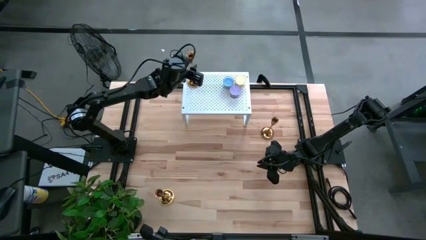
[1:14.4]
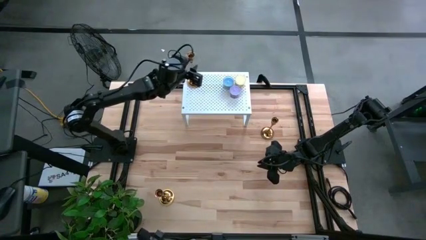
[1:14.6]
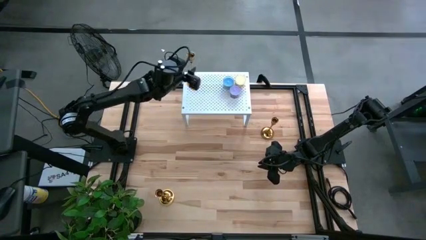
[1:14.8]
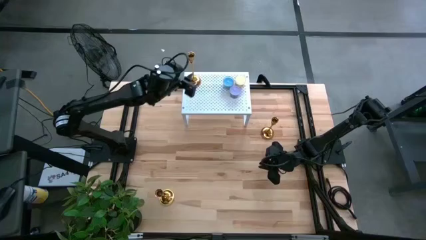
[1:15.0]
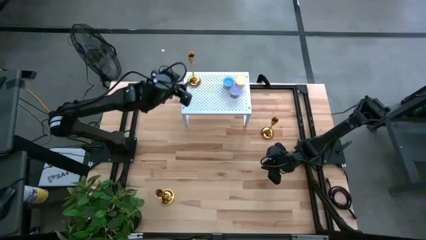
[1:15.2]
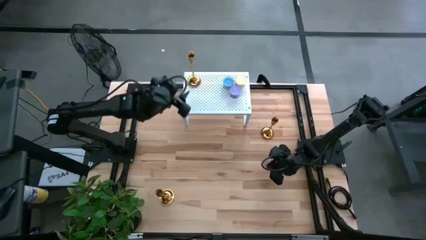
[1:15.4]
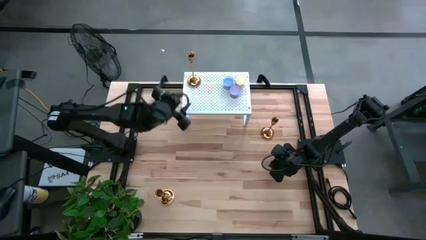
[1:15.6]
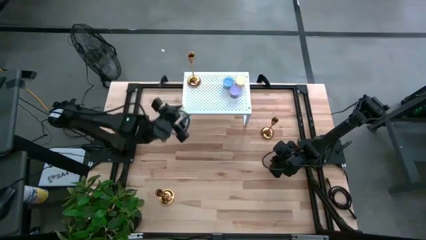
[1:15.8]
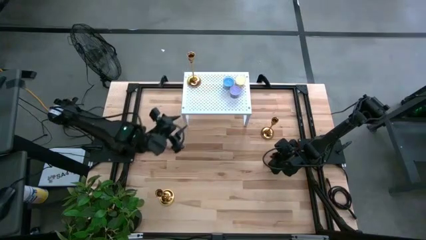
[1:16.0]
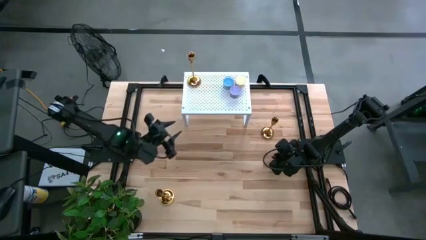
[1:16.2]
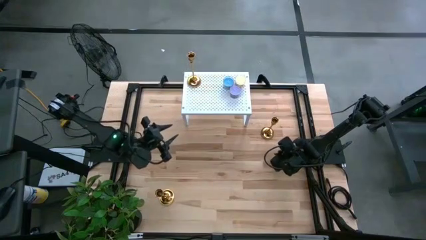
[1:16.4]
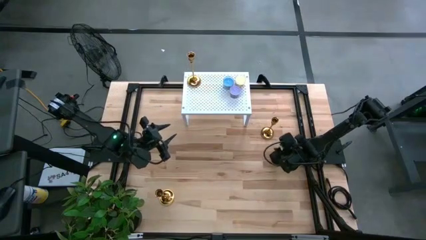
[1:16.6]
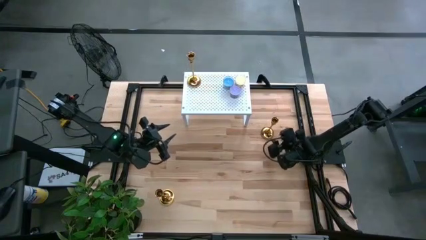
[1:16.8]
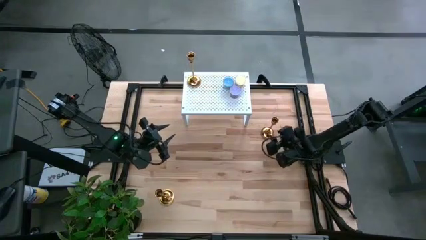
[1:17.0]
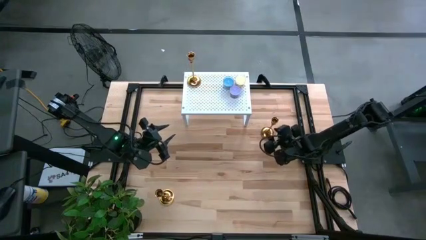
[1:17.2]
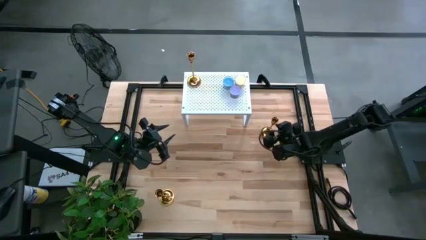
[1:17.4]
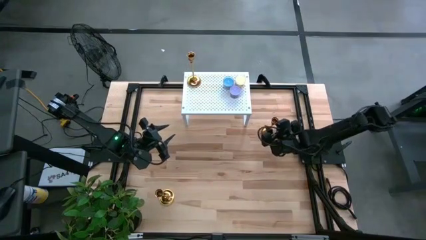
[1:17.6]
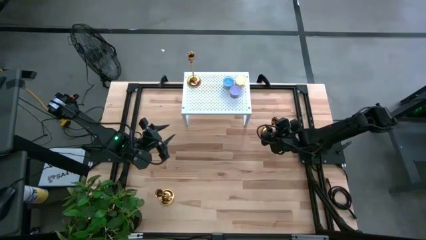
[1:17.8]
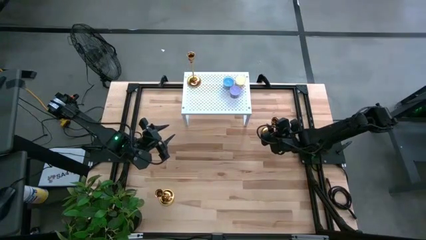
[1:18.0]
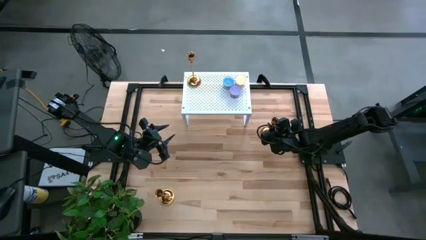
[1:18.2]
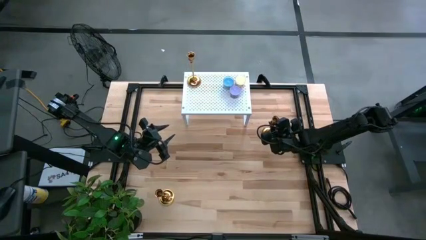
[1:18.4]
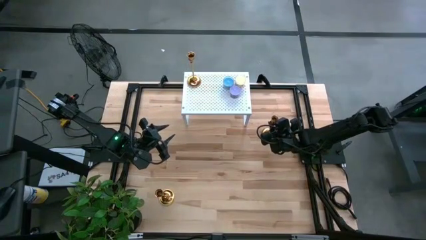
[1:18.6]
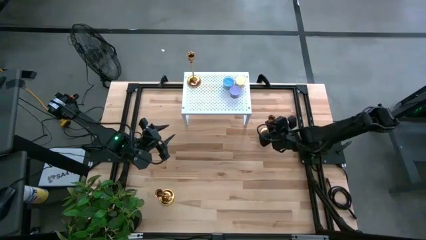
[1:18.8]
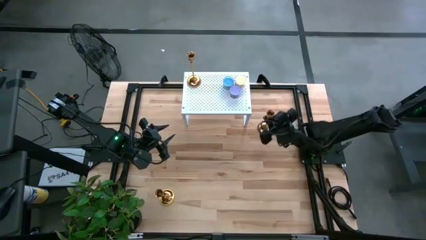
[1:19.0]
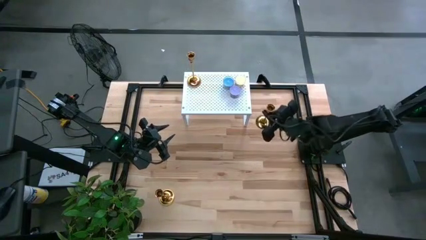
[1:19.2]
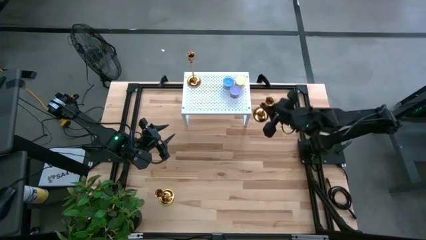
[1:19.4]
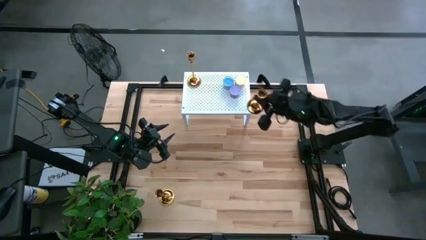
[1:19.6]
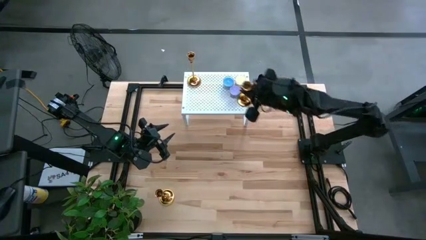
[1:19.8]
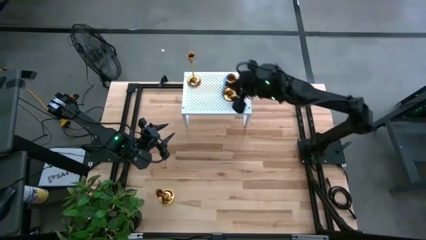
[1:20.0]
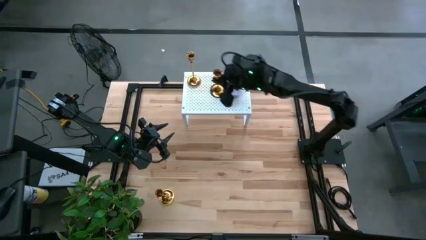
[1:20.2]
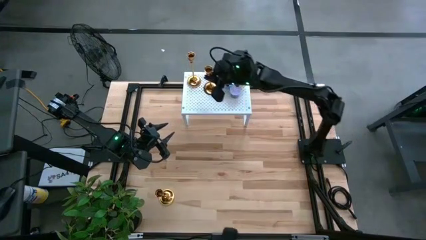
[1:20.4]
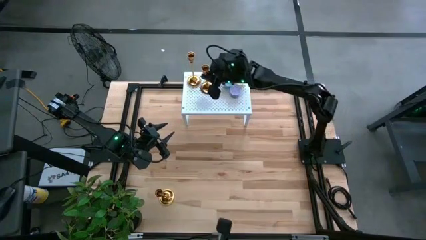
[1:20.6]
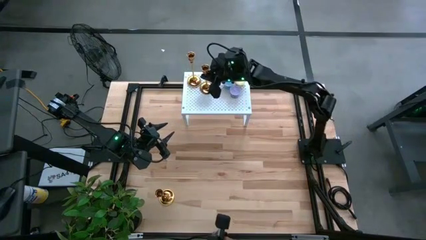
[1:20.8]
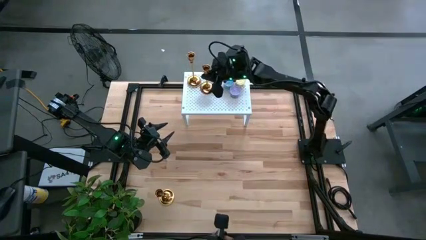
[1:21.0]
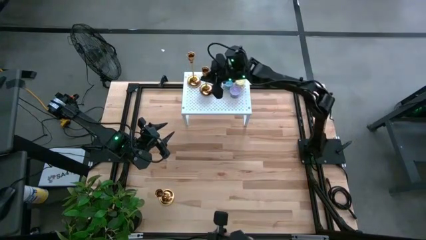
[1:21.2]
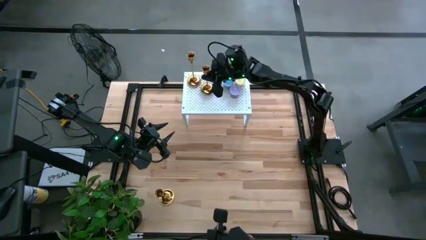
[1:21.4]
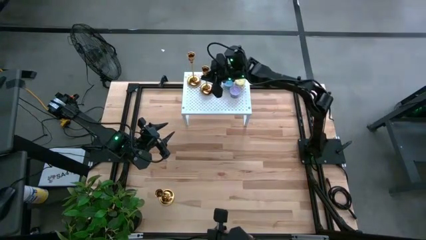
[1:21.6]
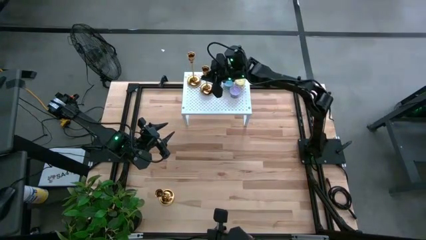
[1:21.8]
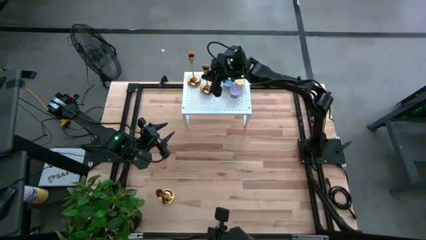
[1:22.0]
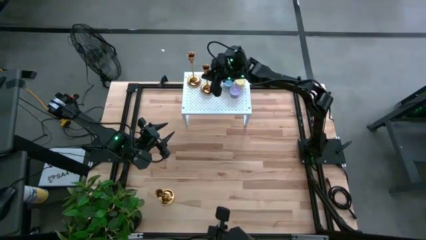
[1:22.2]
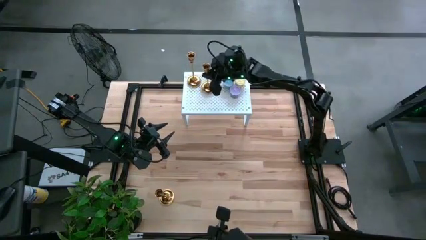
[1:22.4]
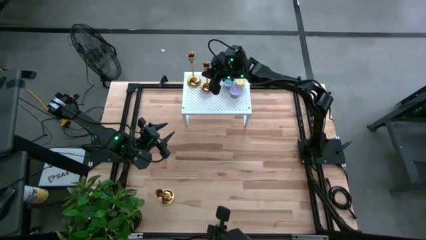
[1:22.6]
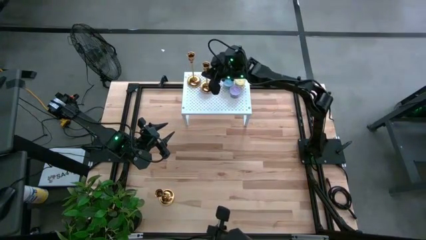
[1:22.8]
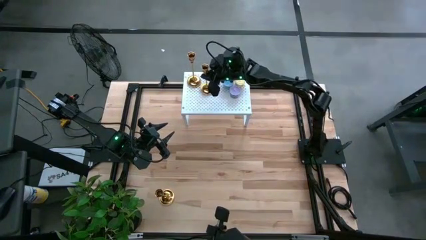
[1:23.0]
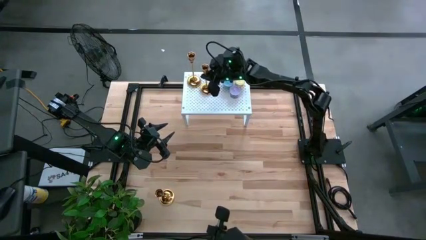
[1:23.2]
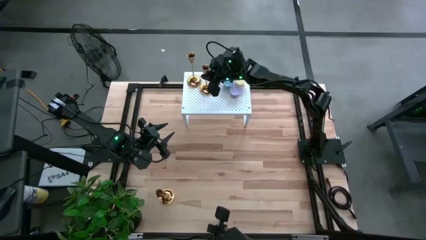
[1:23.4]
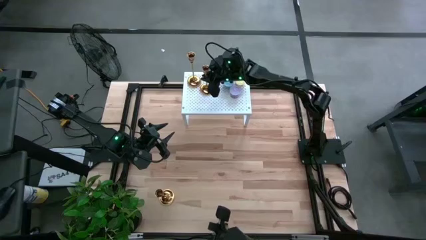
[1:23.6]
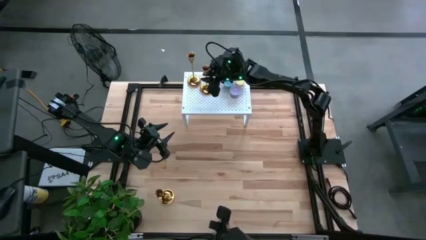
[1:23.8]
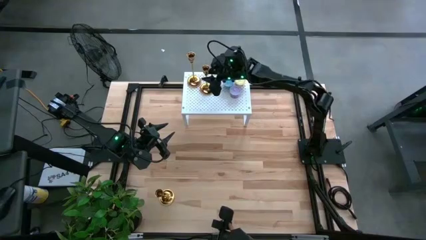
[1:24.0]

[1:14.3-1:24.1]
Task: Pick & Place candle stick holders
Put the top candle holder on the shelf

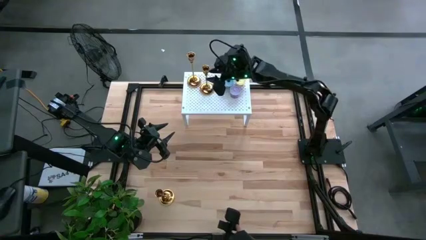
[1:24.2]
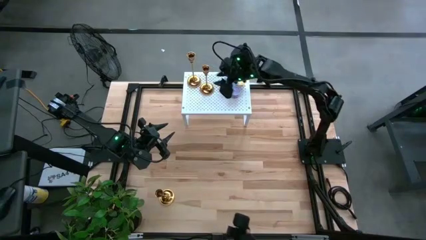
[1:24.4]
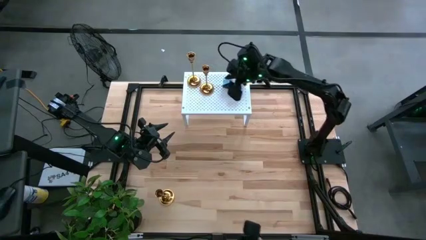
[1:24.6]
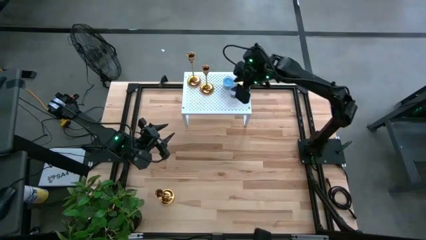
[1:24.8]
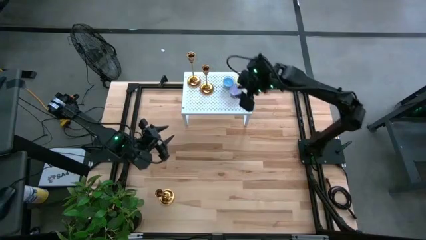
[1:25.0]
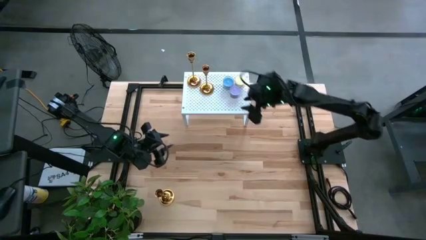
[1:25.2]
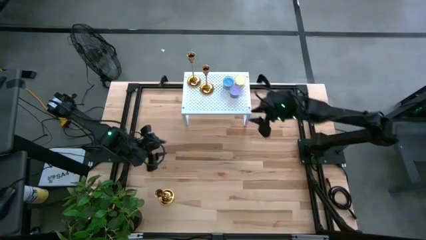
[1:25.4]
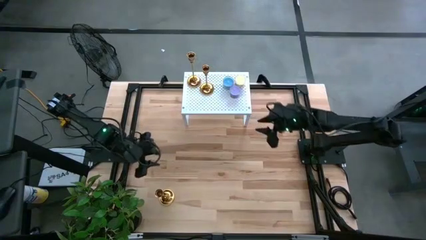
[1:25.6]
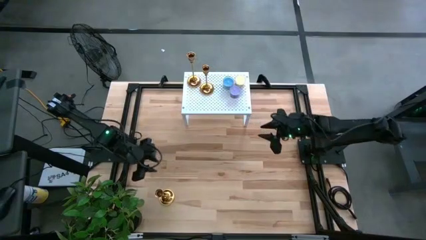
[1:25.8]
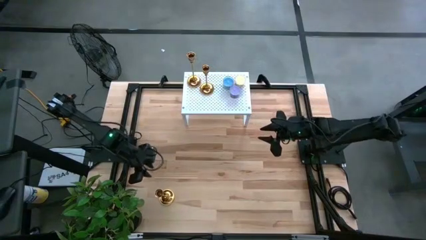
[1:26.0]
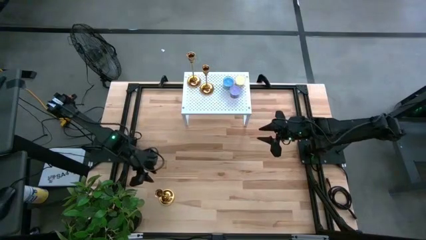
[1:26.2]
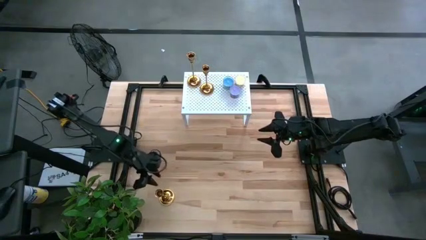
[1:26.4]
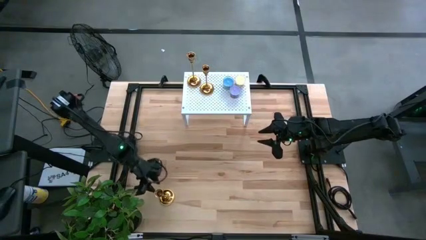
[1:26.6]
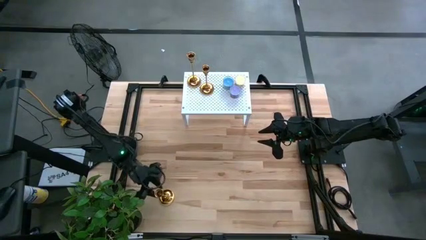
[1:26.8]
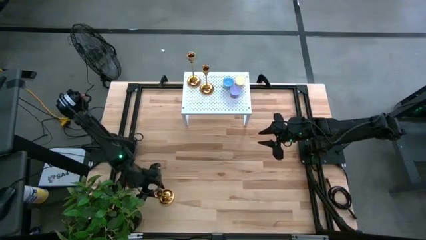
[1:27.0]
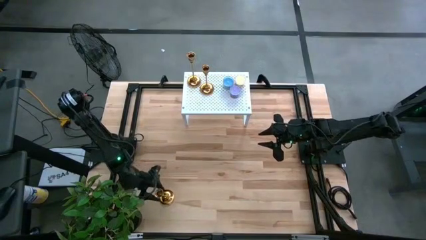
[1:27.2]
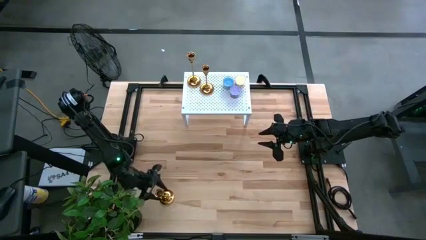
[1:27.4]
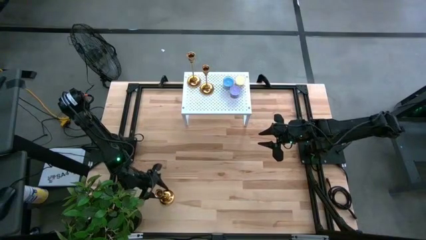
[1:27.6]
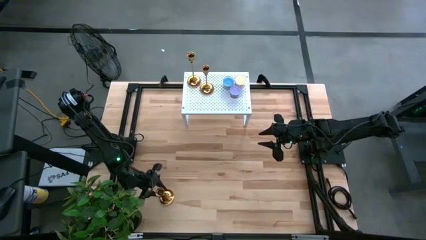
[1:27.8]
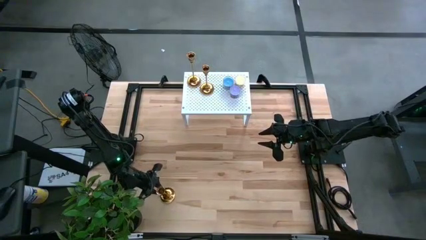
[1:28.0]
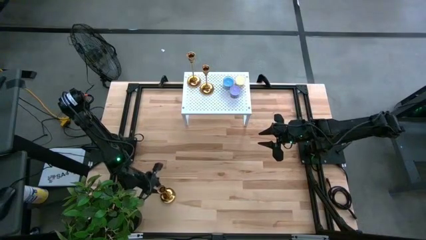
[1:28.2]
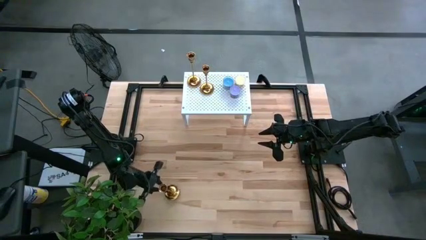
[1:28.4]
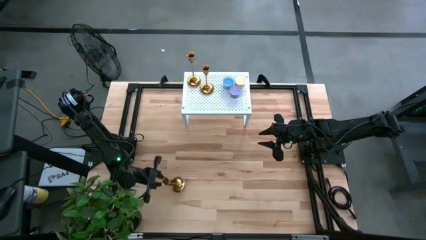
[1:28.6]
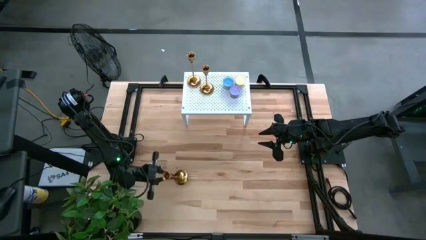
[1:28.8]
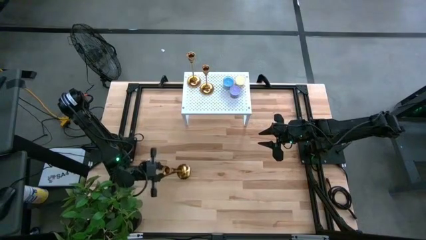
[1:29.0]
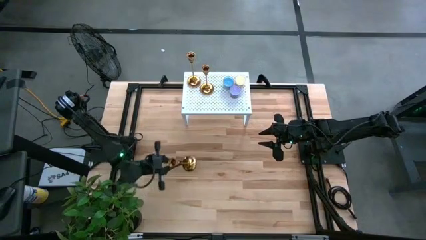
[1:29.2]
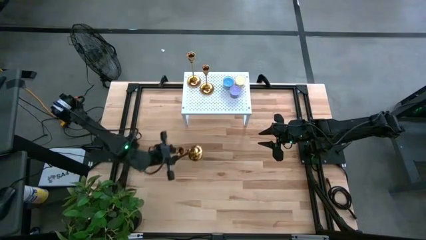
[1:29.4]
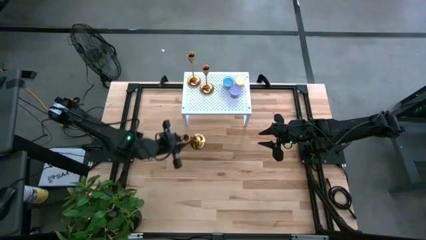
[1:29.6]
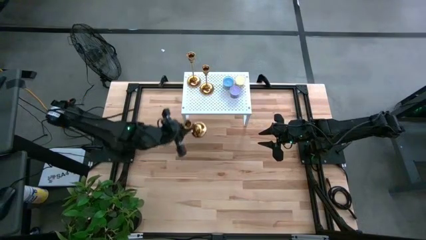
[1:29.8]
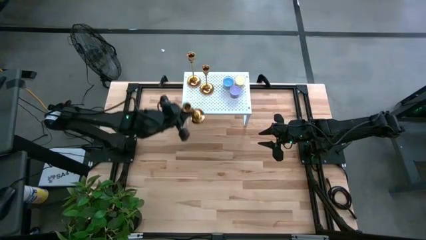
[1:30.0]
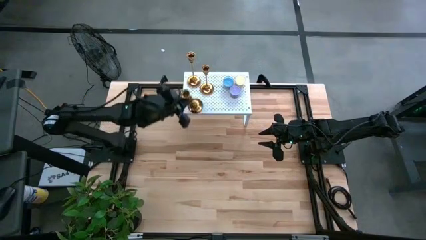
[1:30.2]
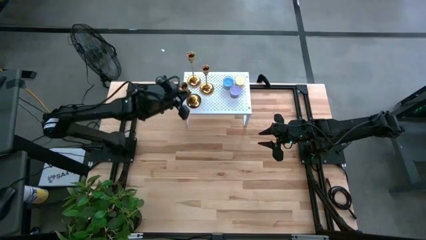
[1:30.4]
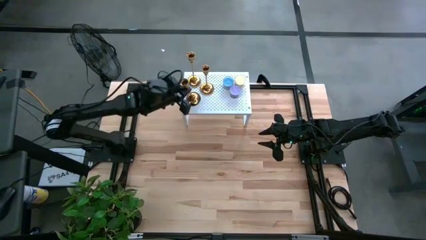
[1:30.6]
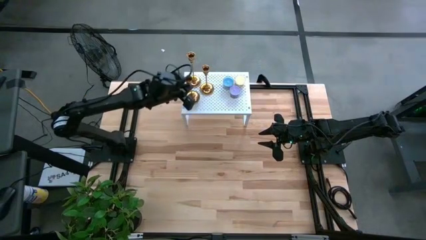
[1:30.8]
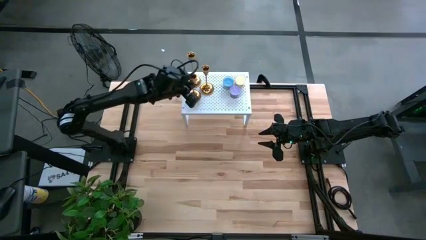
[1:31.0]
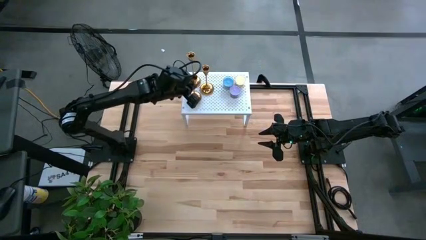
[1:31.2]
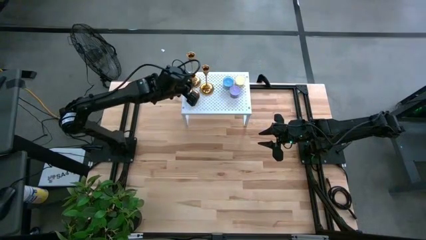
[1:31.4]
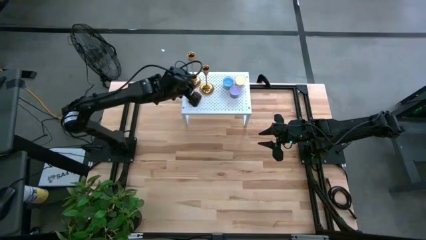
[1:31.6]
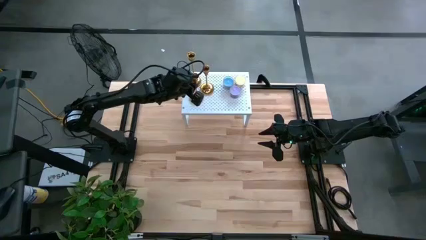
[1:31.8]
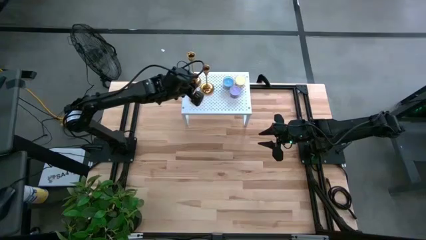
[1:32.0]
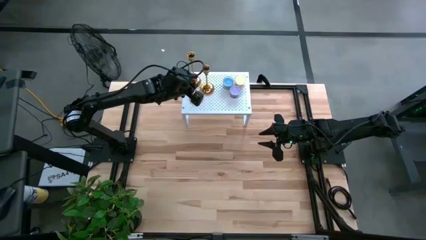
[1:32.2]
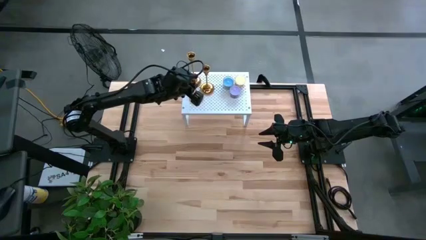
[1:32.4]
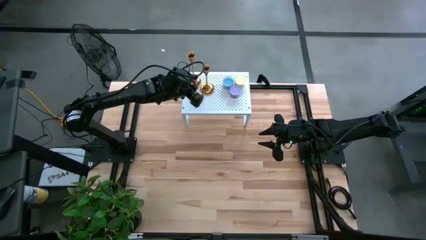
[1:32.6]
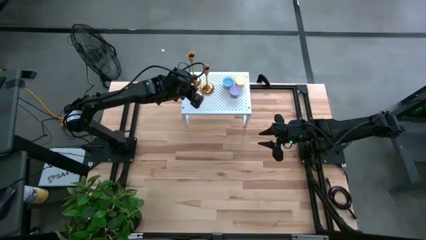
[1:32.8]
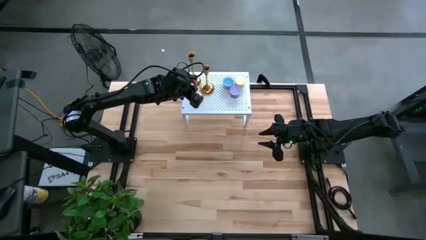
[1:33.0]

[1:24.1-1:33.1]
Put the candle holder on the shelf
